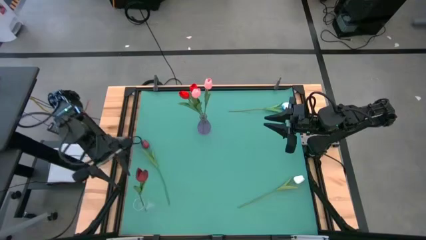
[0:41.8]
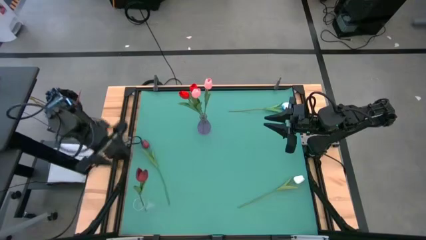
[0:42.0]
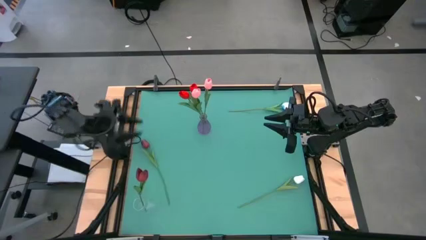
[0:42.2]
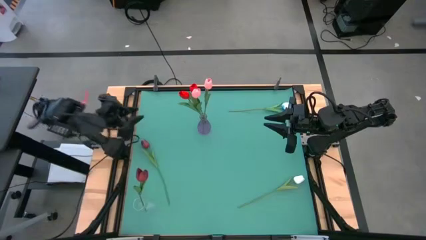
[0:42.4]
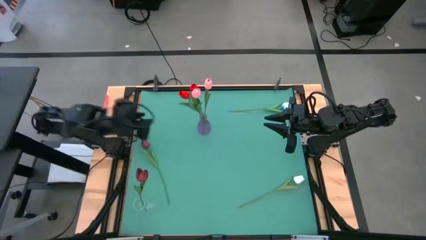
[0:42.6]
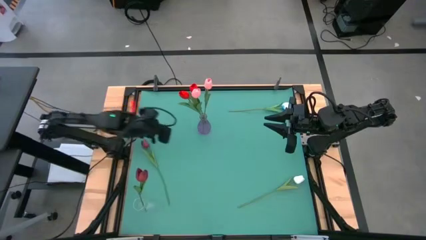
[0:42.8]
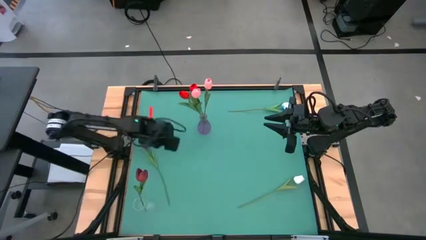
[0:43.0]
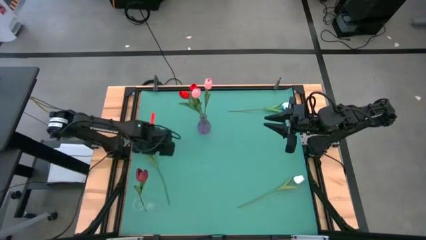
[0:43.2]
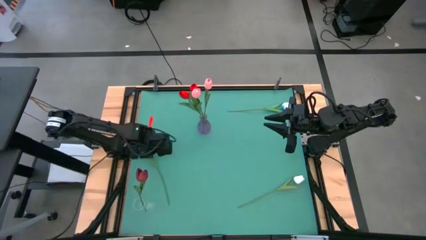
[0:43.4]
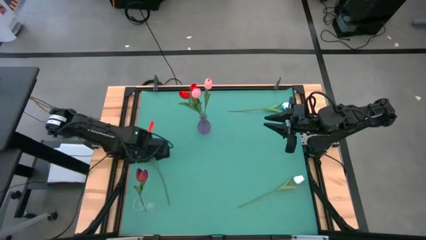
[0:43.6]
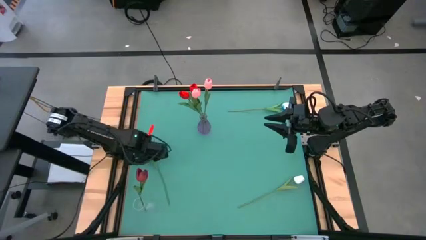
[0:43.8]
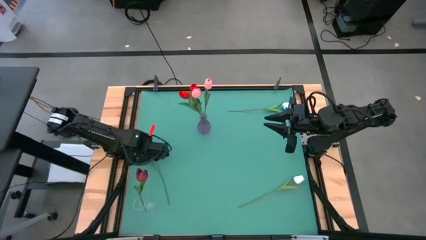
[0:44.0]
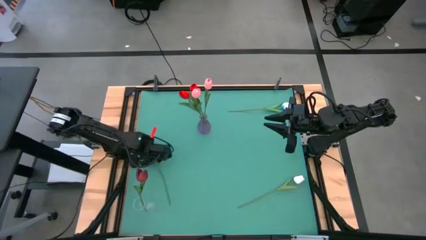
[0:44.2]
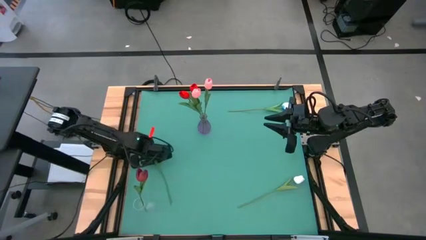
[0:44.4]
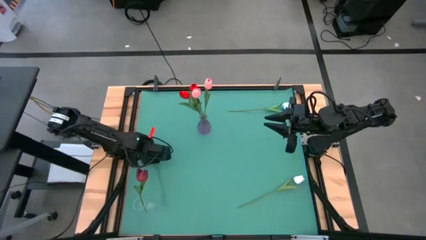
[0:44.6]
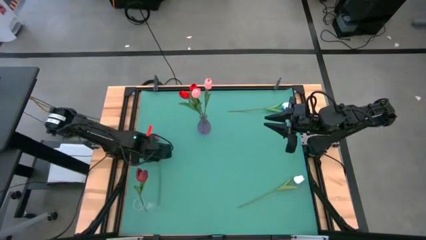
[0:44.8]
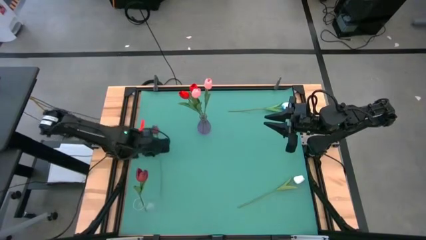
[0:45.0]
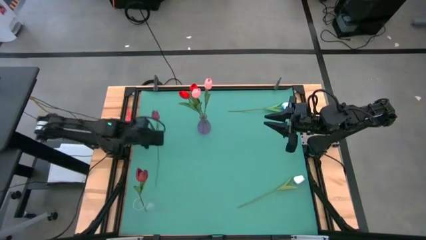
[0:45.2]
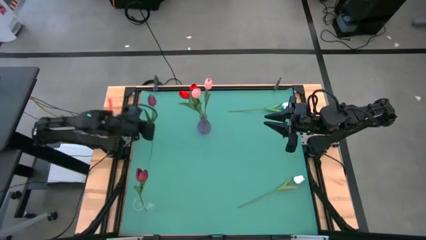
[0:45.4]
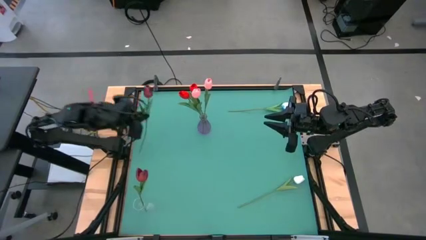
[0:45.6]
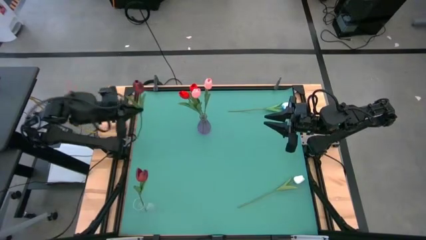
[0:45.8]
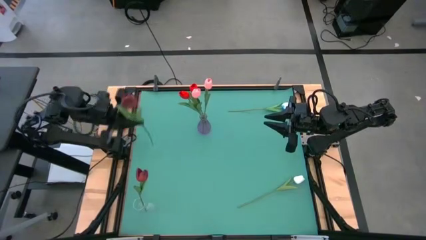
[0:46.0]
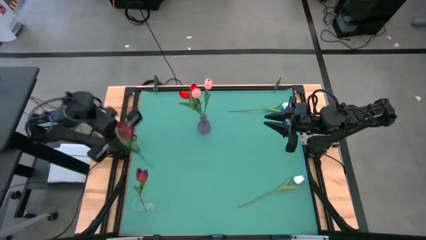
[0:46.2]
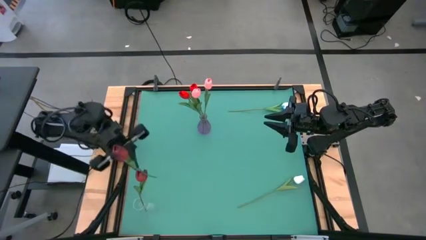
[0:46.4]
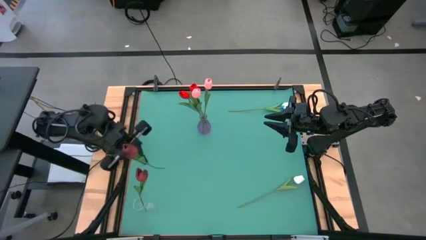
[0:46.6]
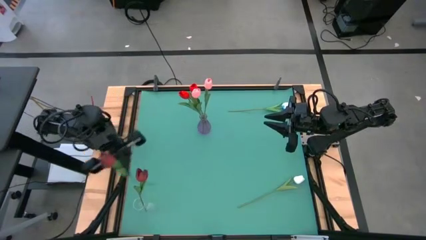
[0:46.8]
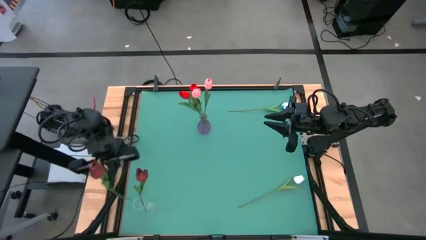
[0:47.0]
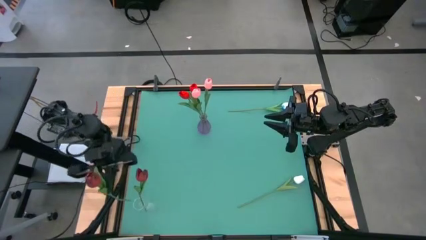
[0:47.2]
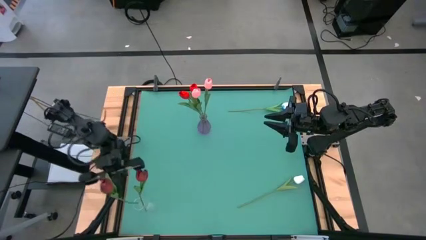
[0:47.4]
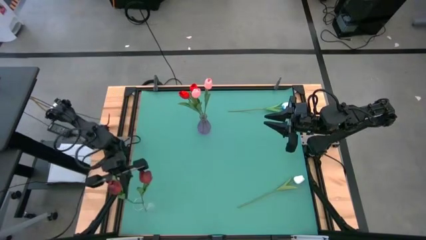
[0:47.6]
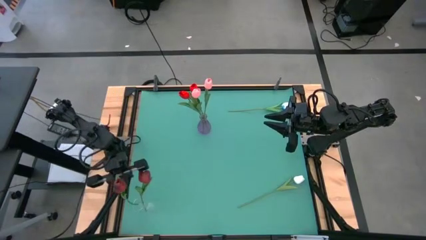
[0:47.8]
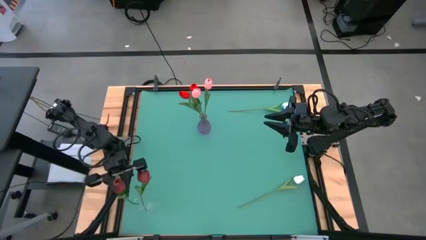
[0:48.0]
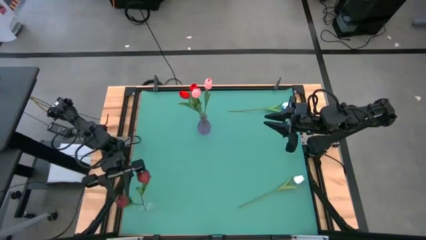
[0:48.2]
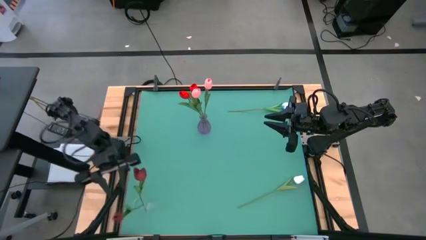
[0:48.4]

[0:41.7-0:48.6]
Task: Sort flowers into vase by color
Put the dark red flower into the transparent vase

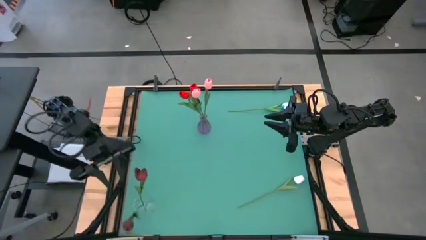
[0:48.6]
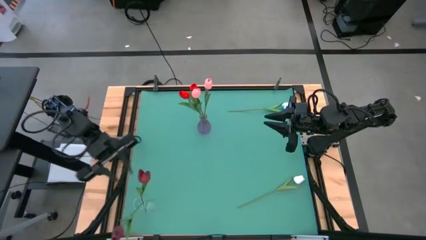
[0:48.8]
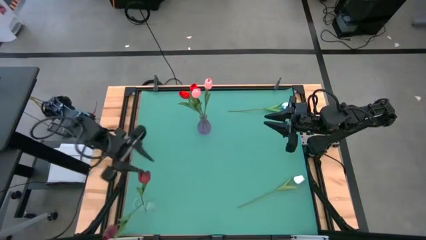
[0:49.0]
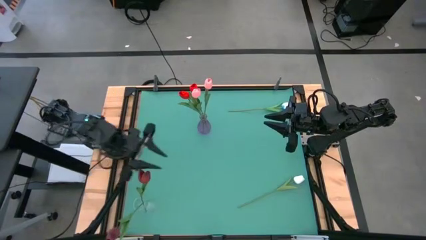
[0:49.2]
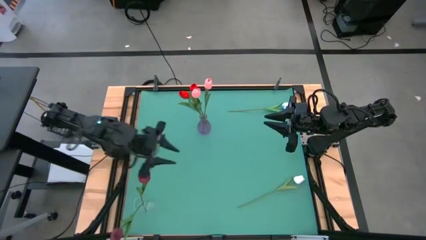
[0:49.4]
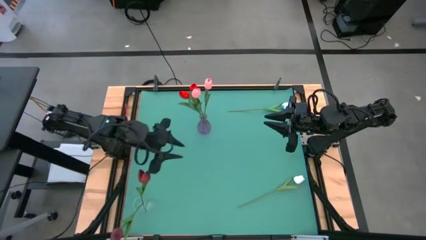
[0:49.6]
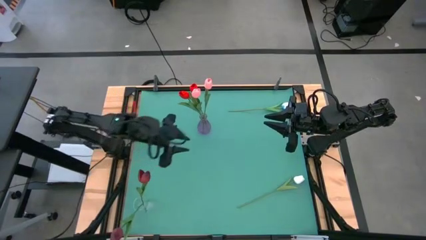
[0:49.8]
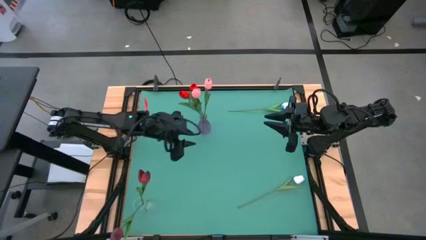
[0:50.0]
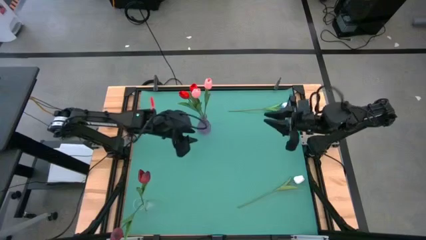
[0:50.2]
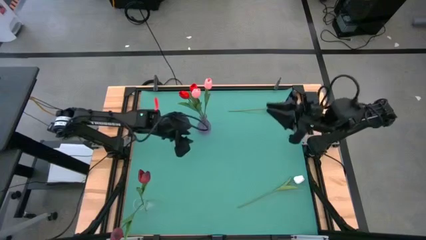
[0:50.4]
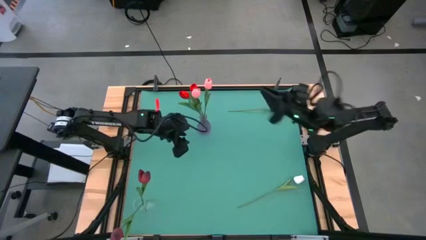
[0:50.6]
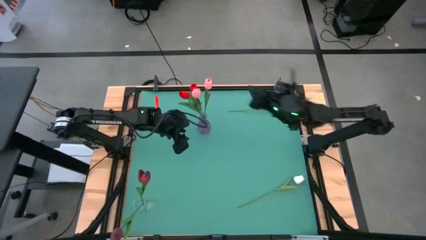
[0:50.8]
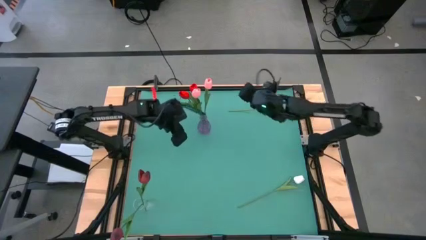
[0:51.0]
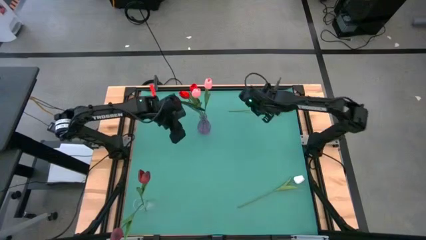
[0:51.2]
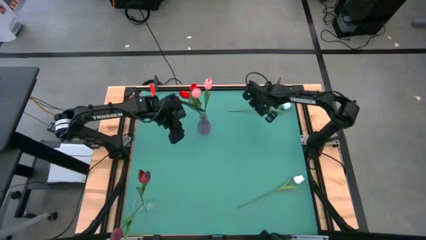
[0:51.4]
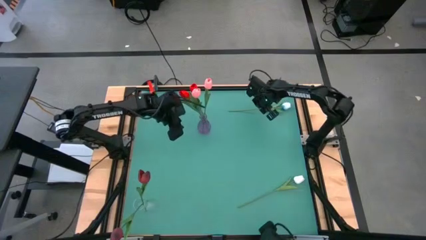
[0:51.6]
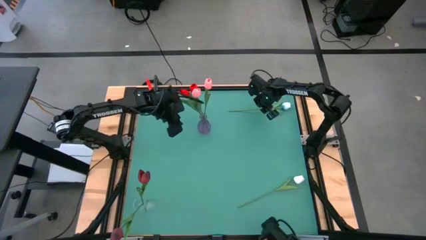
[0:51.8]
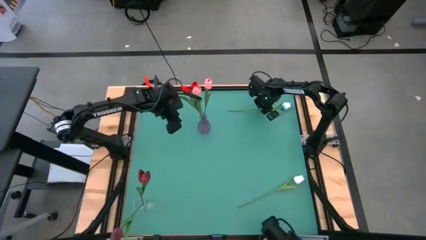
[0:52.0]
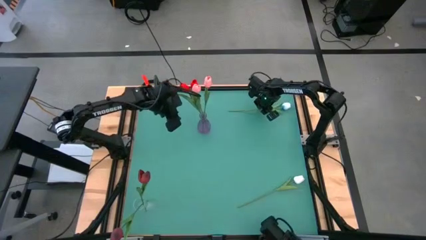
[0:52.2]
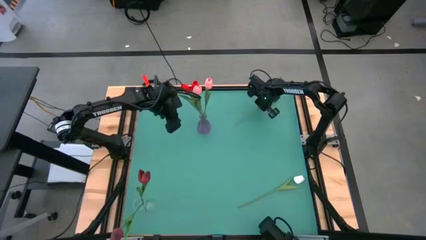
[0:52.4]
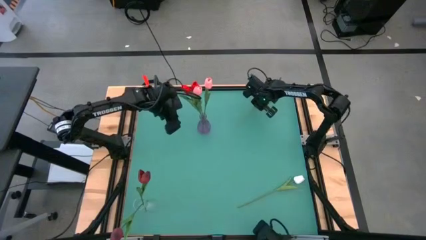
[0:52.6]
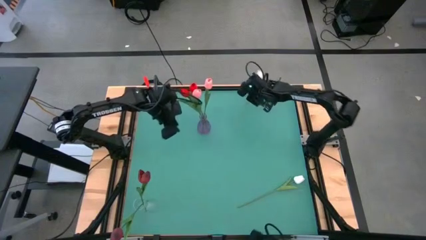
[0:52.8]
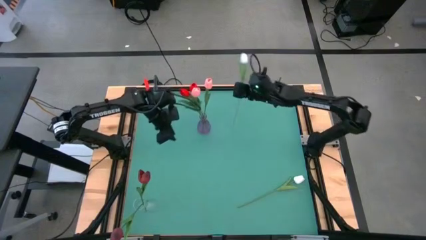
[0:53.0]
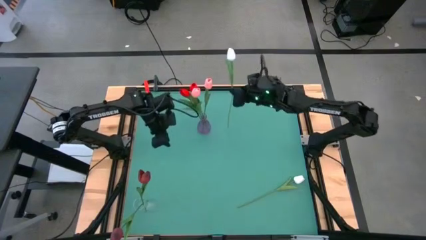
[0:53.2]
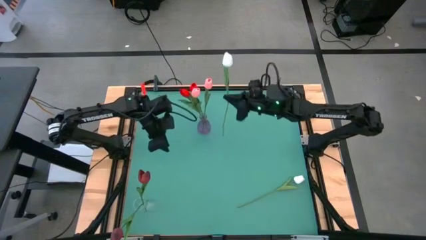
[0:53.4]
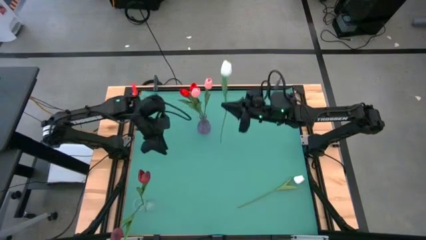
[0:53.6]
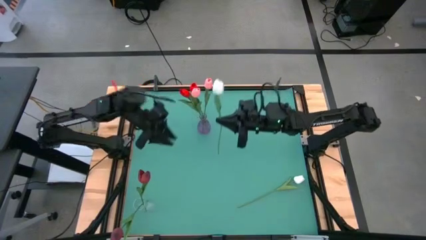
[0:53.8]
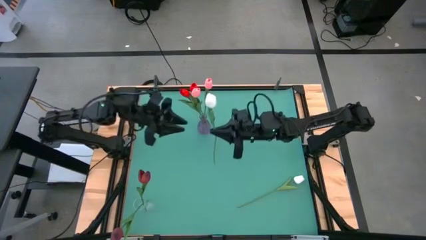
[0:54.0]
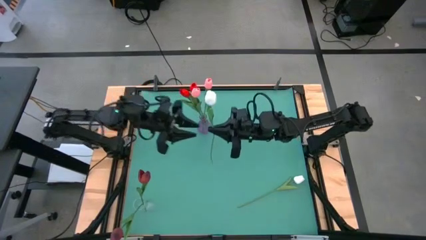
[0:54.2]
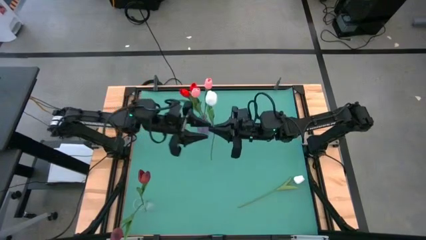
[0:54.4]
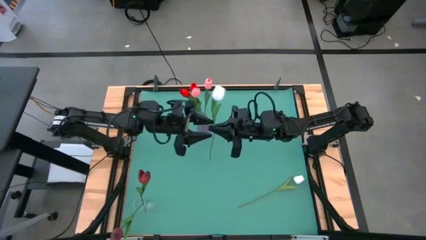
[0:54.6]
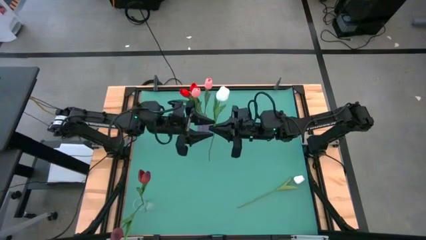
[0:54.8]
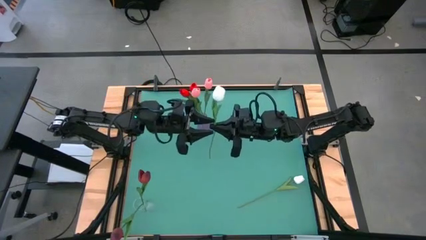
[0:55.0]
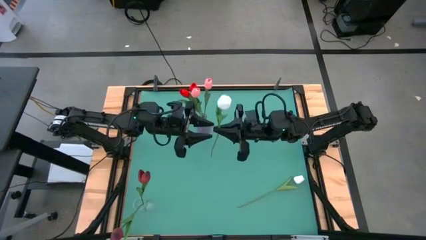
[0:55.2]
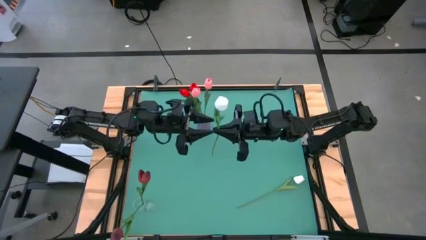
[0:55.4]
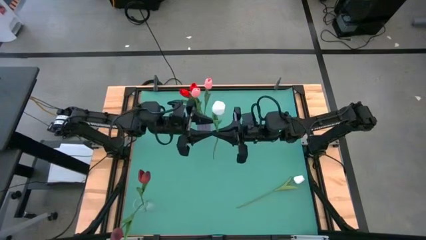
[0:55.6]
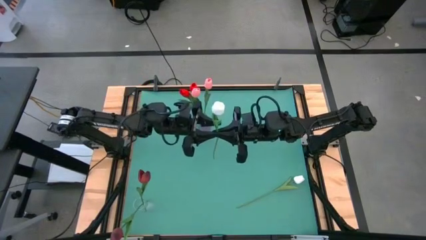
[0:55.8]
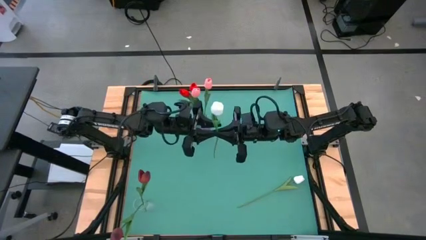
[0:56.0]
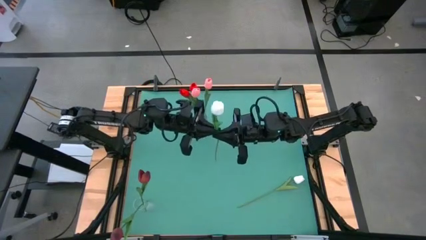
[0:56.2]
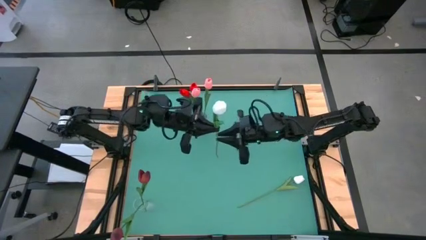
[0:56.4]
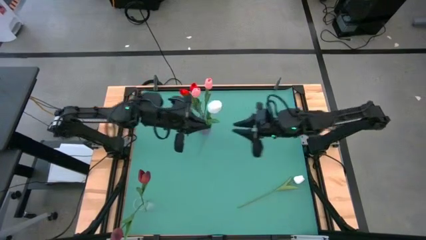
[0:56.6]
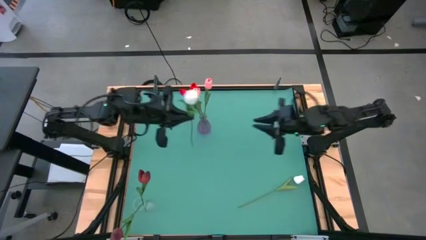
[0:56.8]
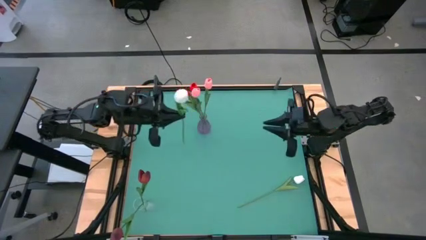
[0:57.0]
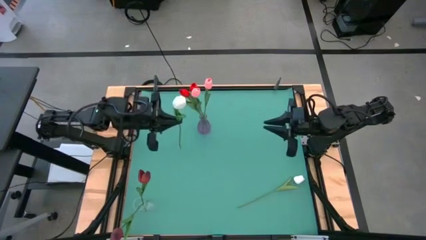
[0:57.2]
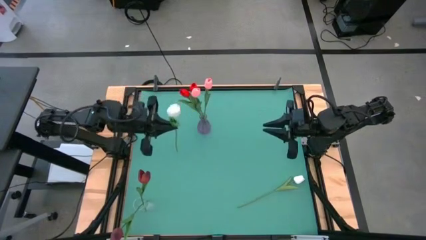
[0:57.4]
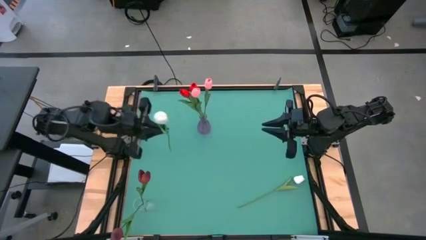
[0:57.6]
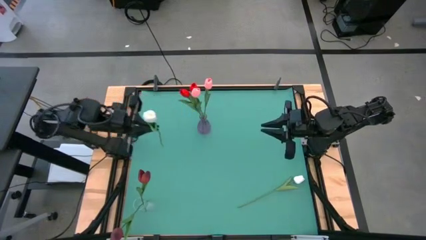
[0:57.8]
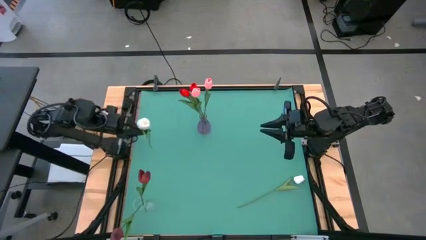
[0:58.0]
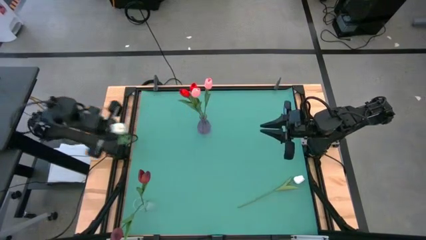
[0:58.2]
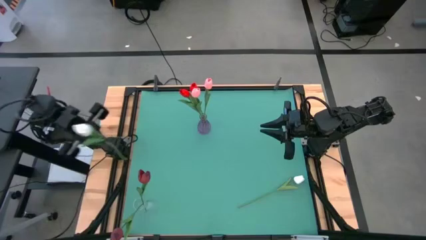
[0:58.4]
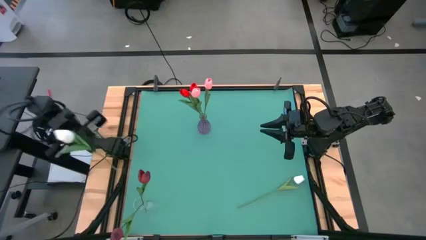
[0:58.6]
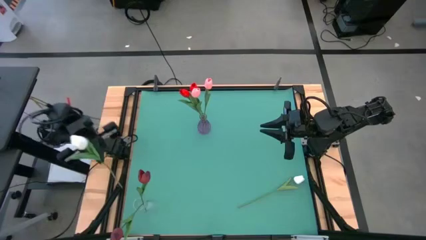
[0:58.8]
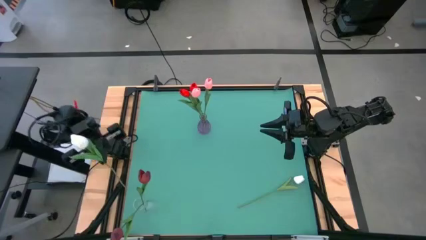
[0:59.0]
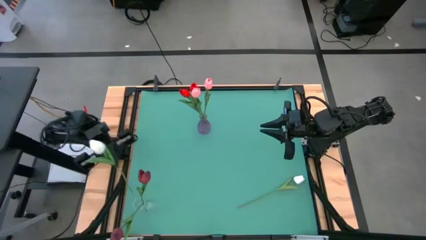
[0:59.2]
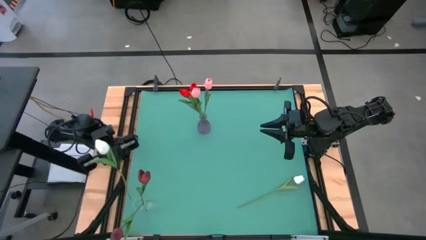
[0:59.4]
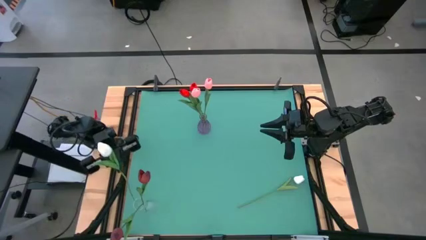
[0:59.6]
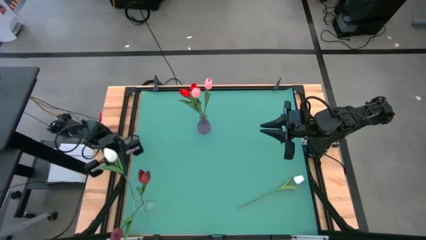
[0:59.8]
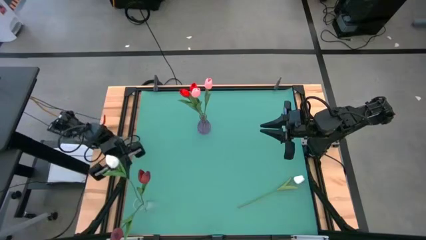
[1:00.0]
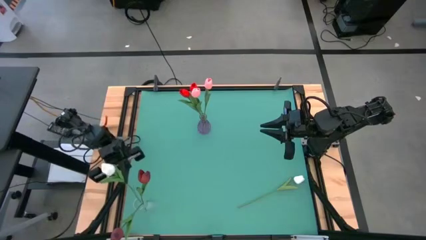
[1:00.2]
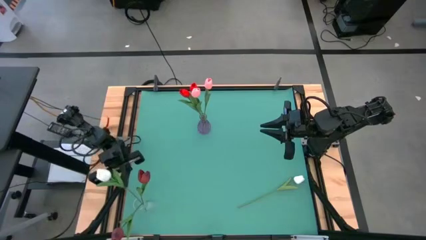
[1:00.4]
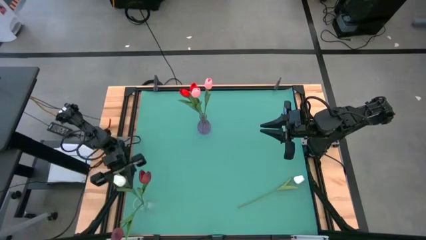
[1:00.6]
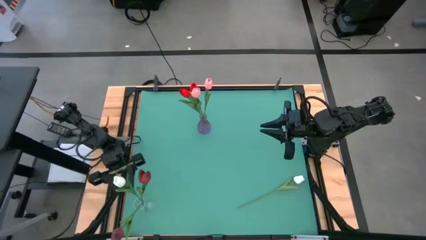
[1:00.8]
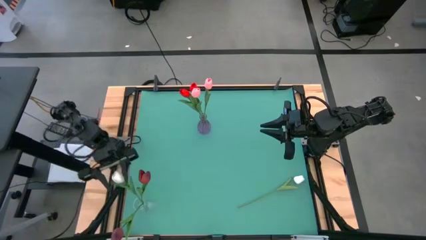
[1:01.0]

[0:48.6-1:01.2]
Put the top white flower into the transparent vase
